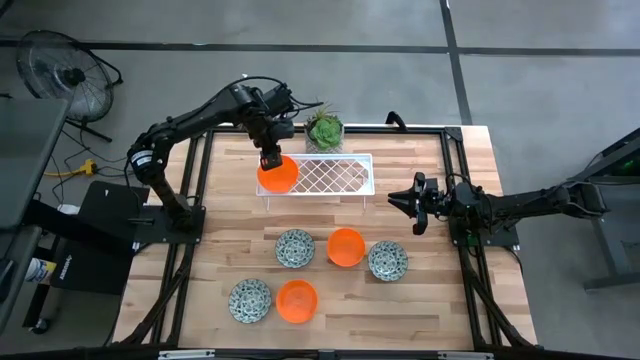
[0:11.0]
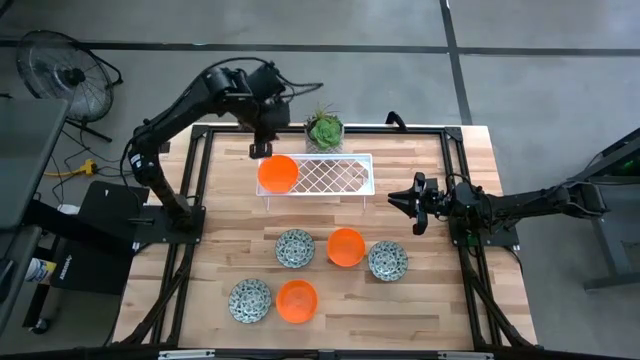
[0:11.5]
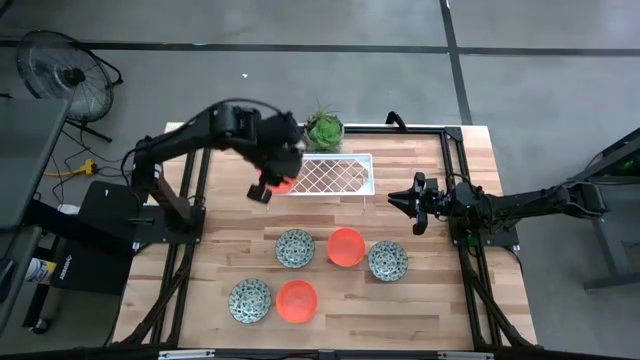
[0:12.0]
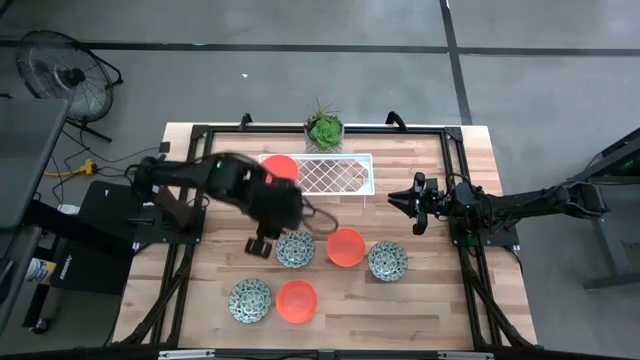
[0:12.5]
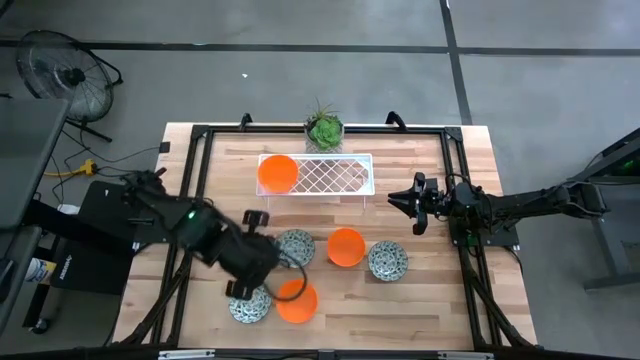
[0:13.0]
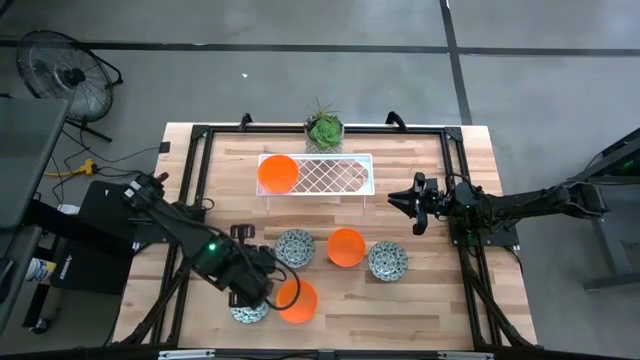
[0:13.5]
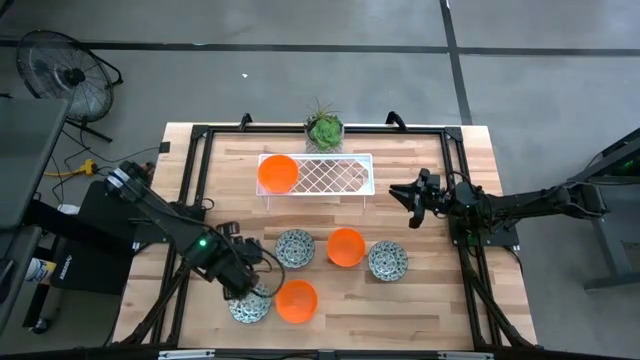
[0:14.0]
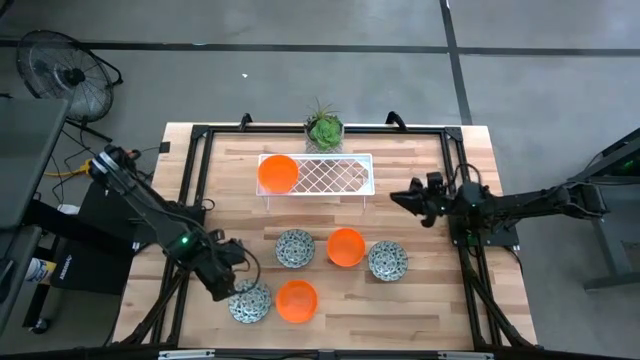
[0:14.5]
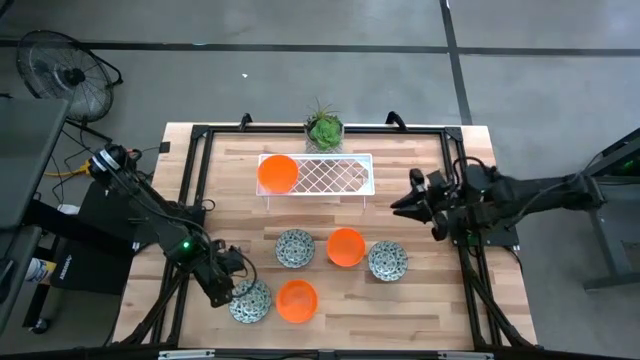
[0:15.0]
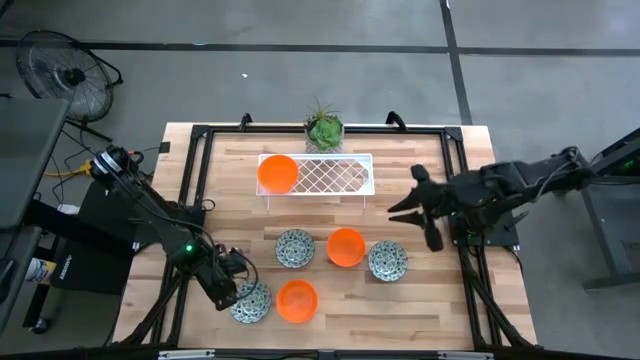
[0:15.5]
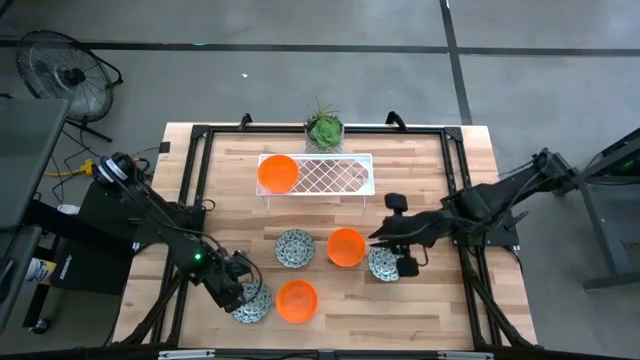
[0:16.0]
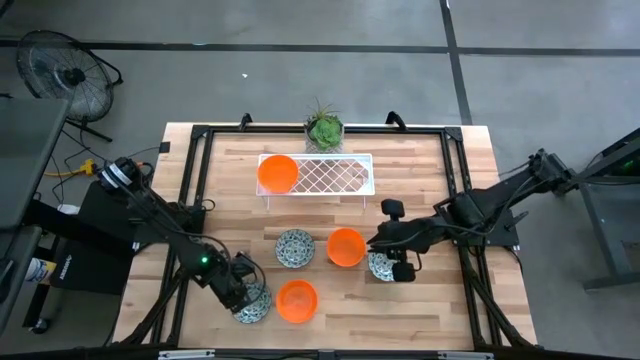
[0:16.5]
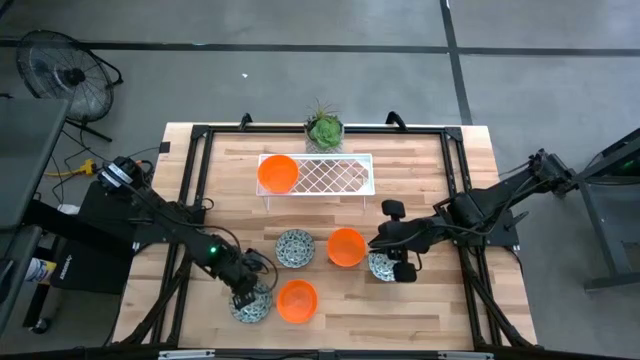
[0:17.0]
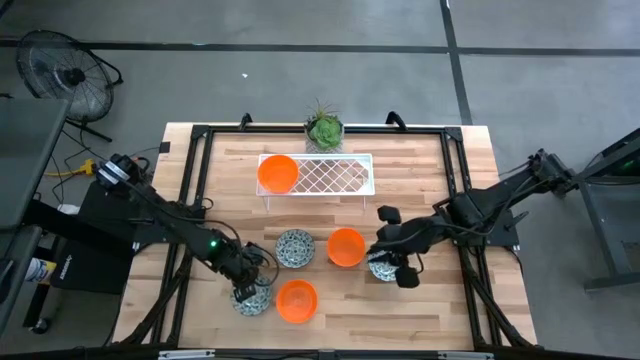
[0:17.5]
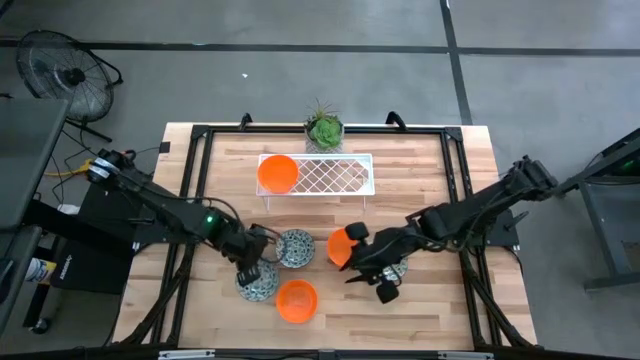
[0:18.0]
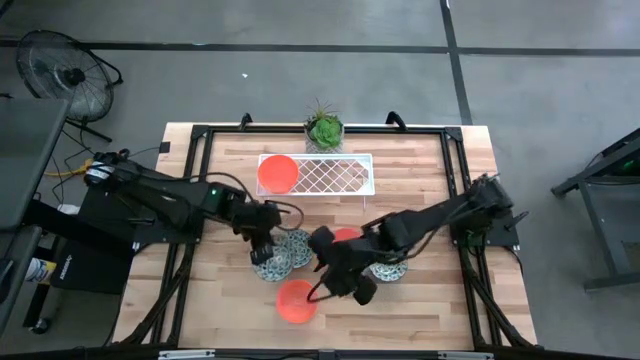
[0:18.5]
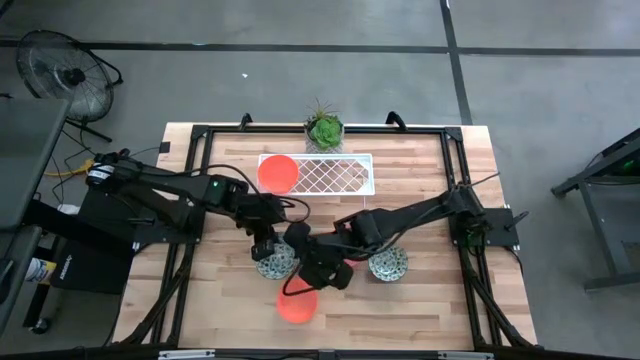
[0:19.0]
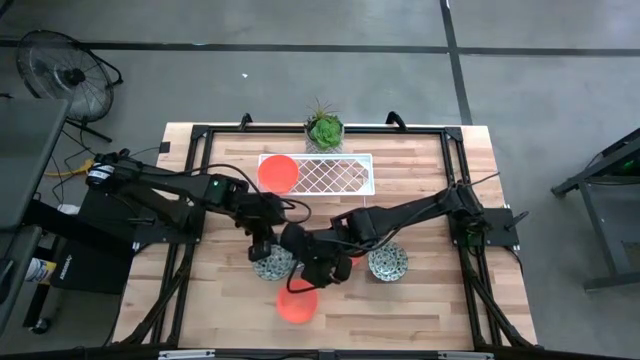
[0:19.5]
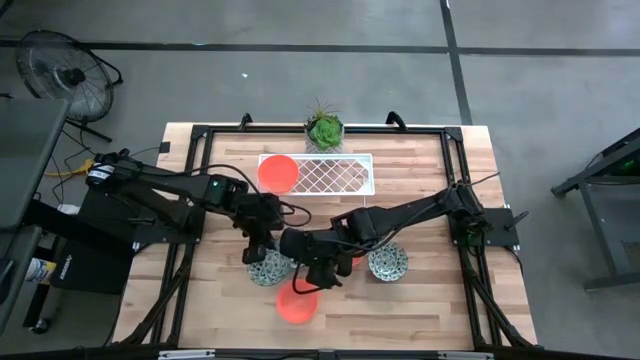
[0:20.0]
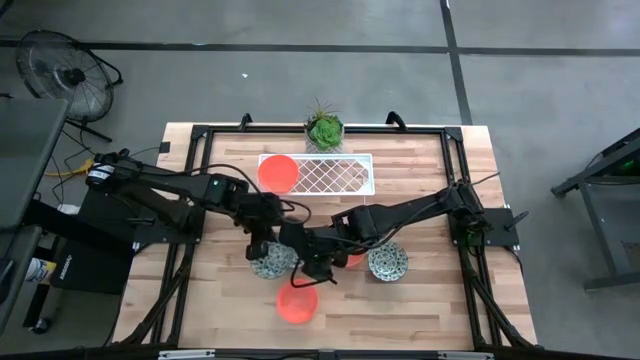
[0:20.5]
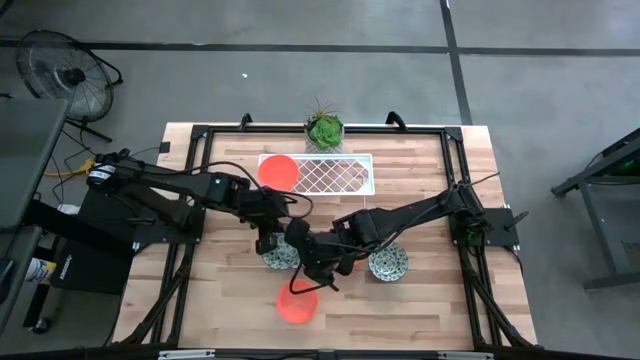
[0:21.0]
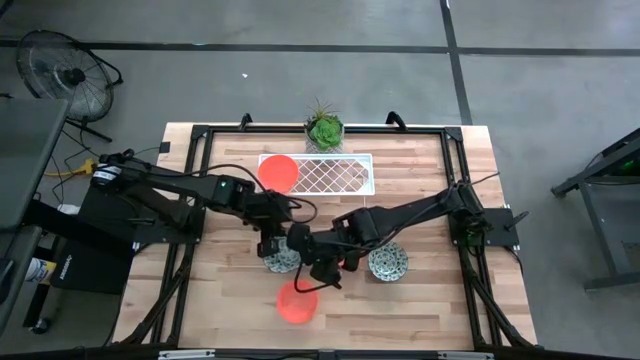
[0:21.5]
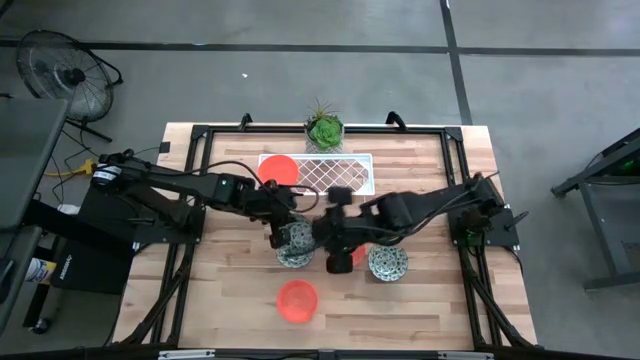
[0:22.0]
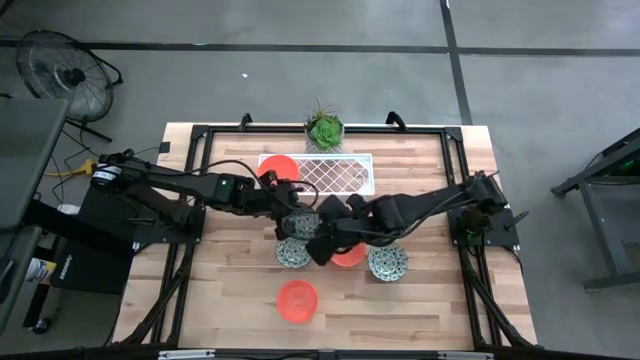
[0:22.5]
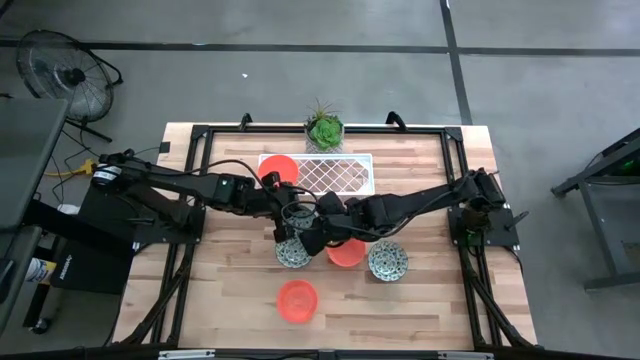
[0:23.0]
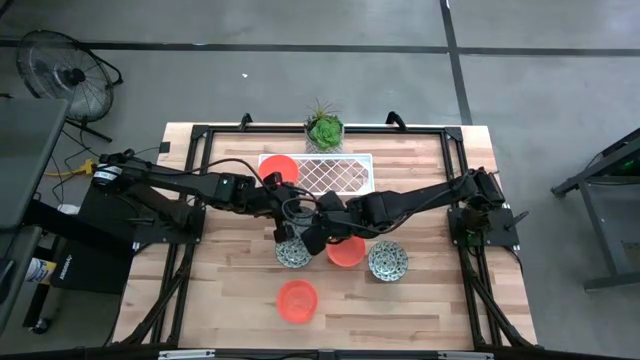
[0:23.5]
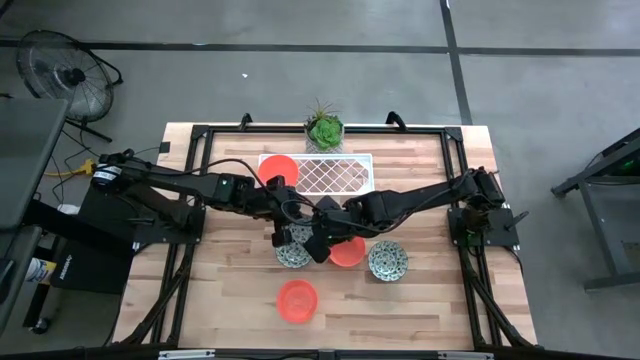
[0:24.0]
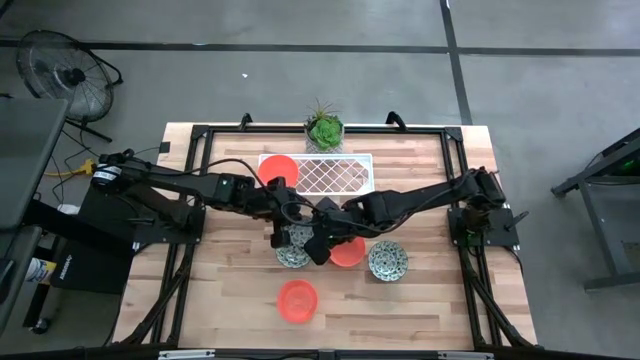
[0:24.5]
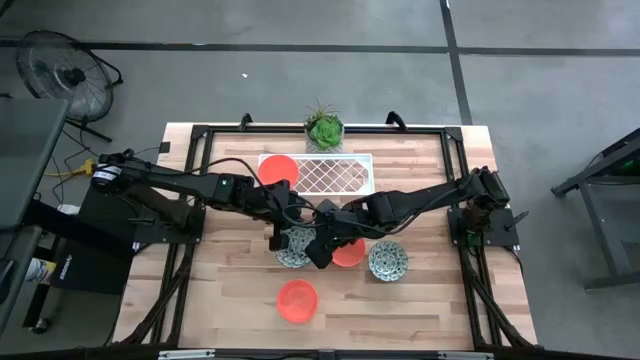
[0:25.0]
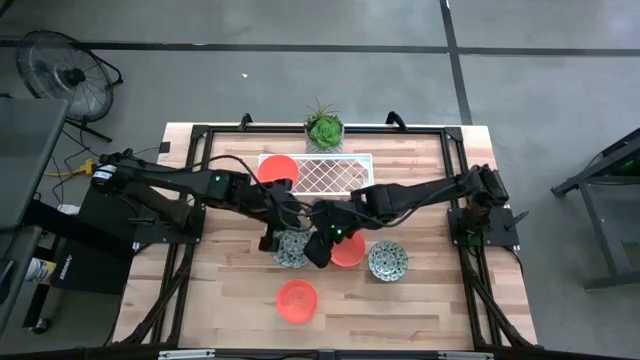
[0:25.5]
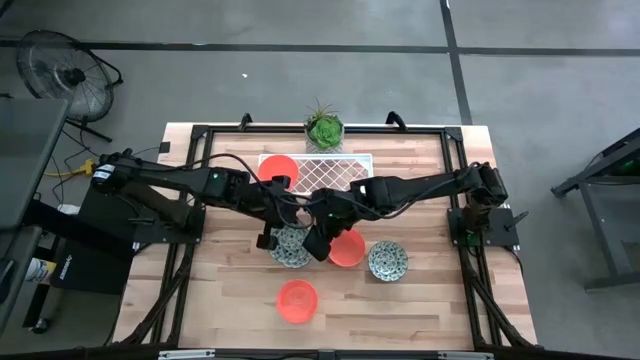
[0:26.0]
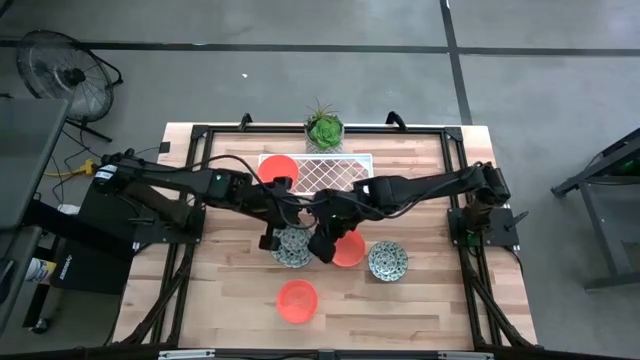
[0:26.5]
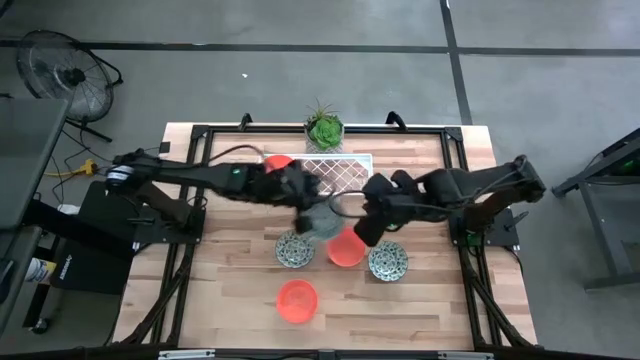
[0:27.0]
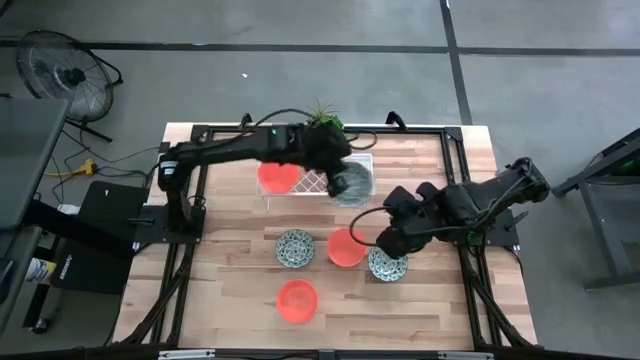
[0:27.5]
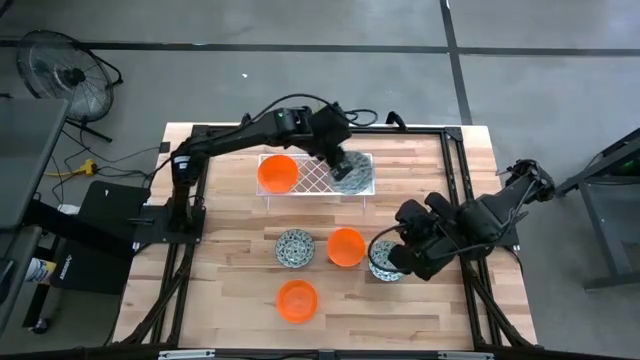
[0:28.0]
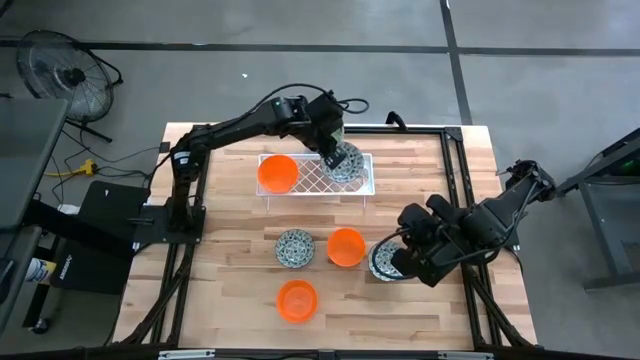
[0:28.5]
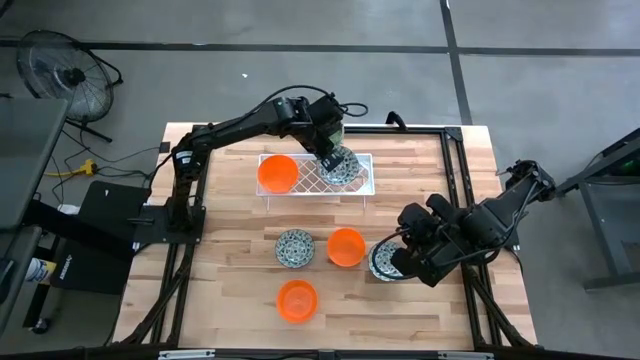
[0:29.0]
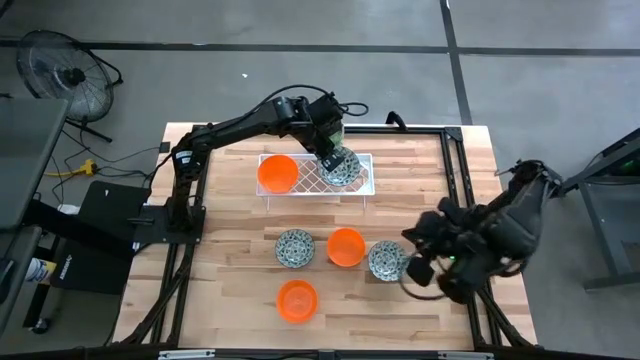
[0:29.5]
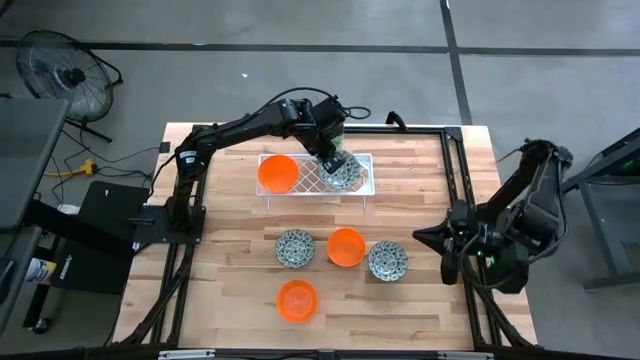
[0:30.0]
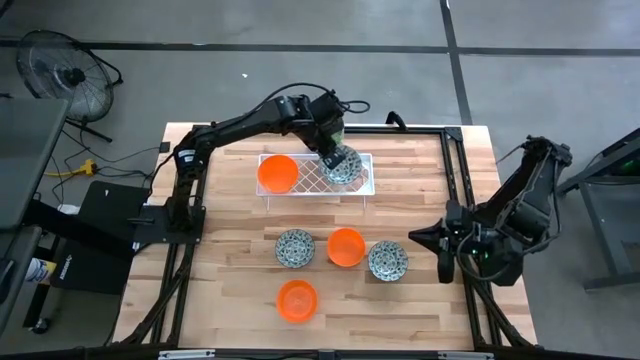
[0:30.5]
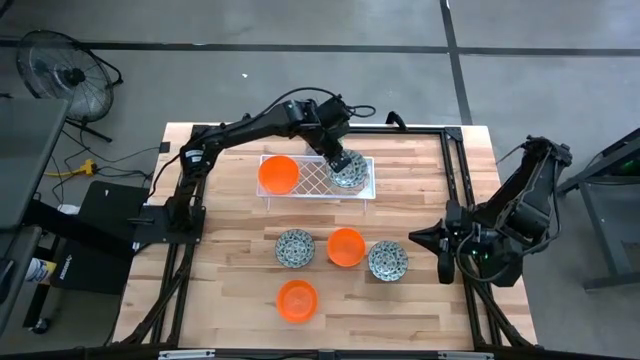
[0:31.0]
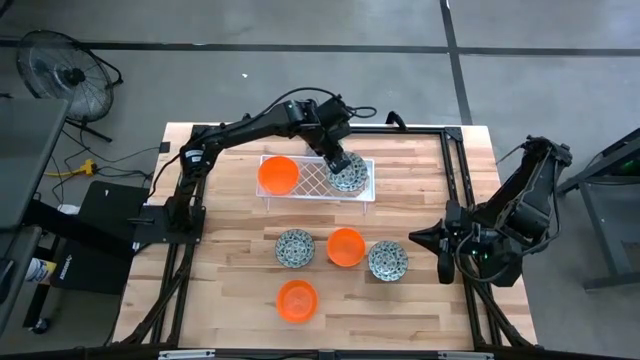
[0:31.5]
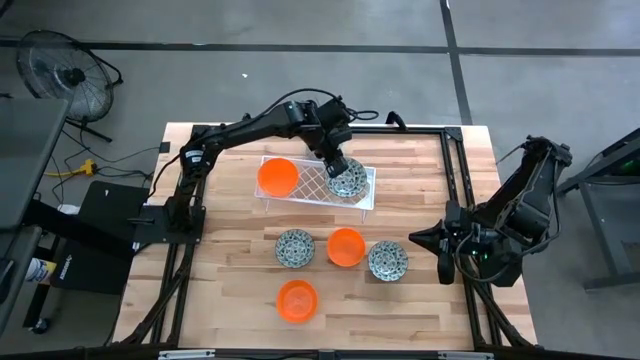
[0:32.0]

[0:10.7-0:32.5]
Task: Pick & Place Mini bowls
Put the bottom blue bowl on the shelf
